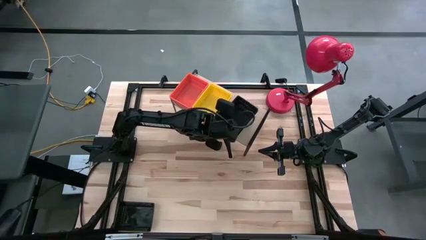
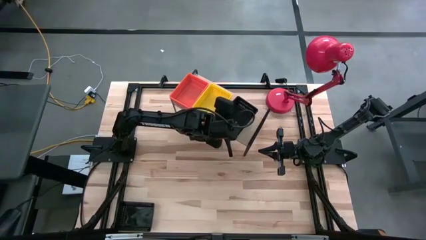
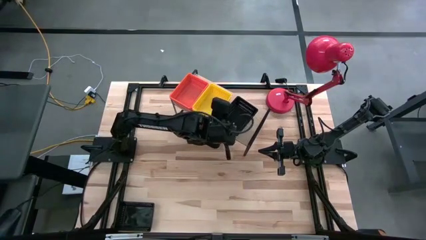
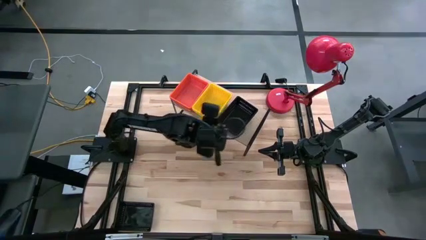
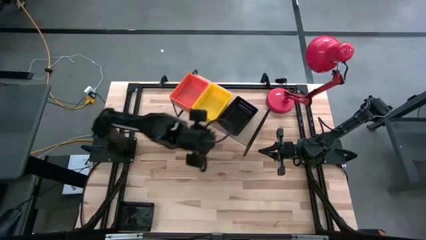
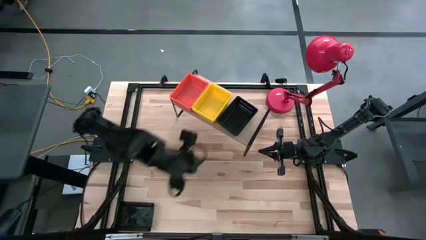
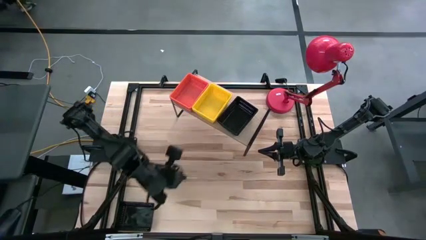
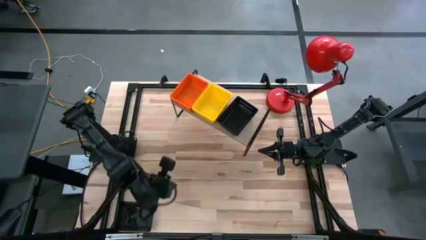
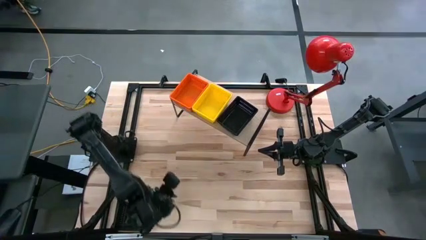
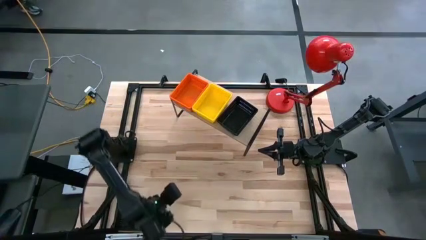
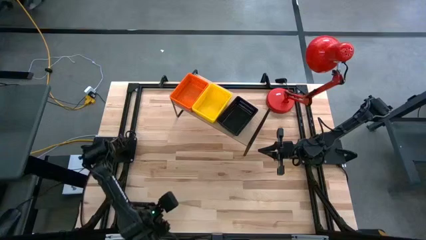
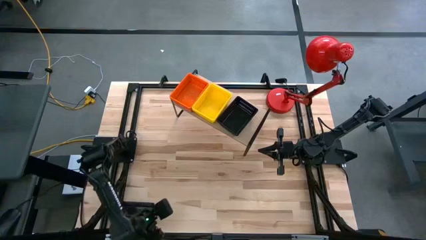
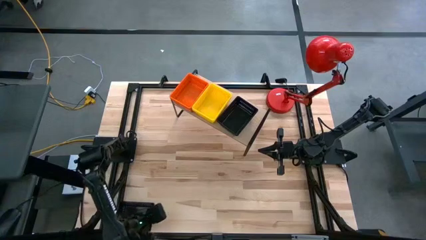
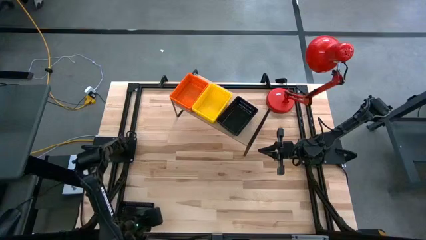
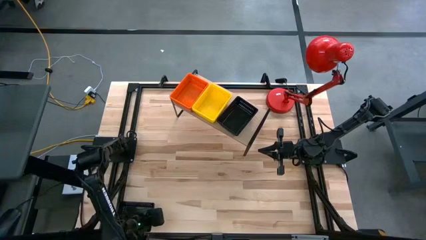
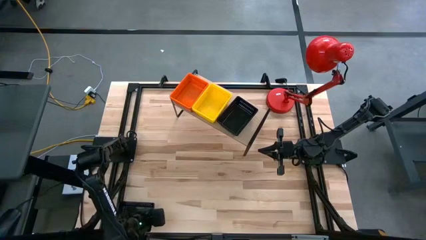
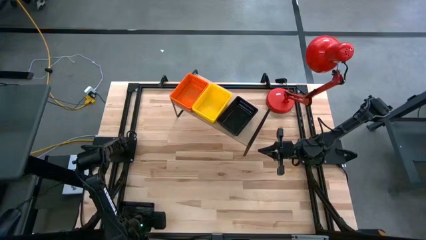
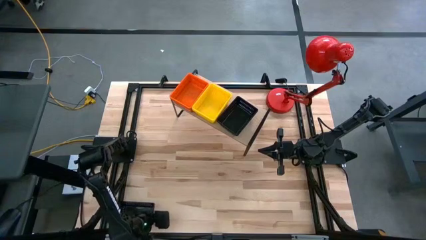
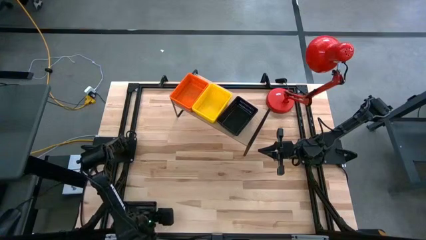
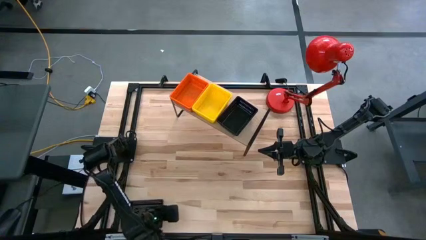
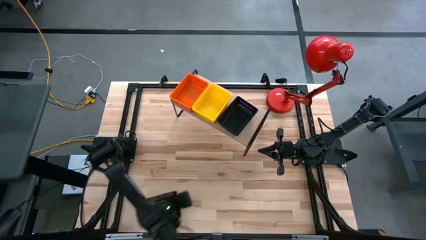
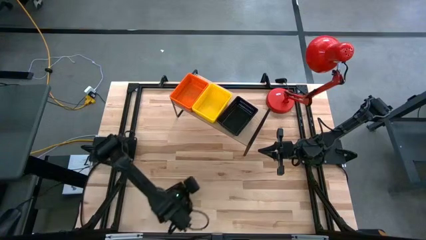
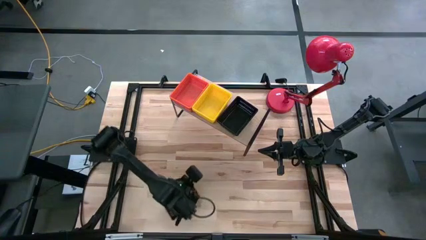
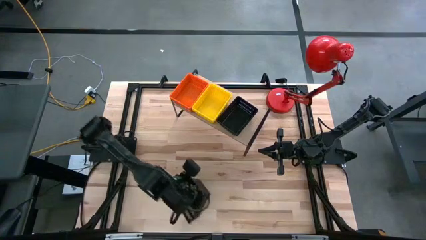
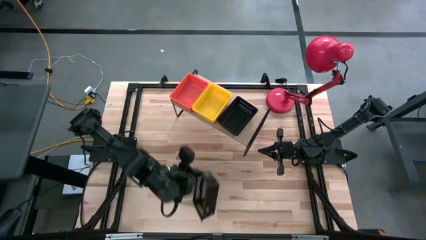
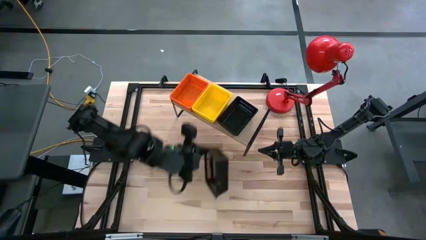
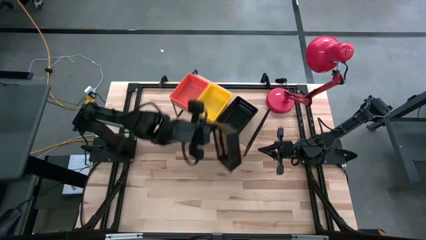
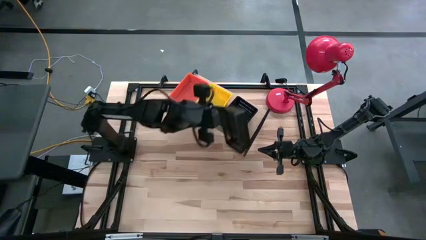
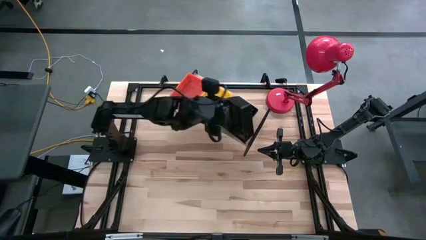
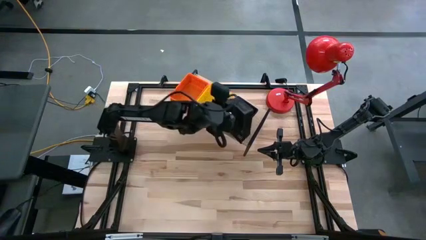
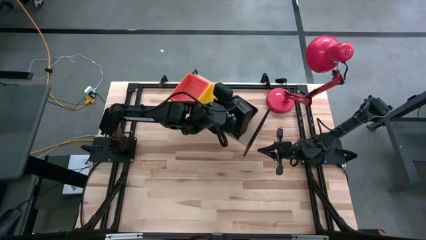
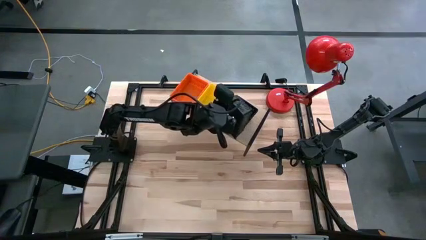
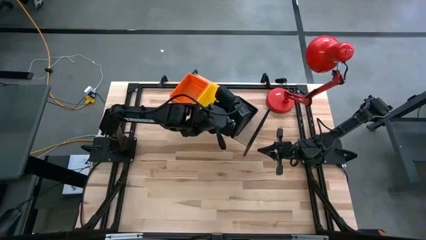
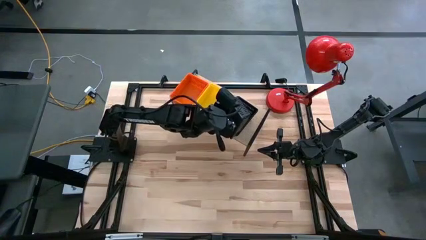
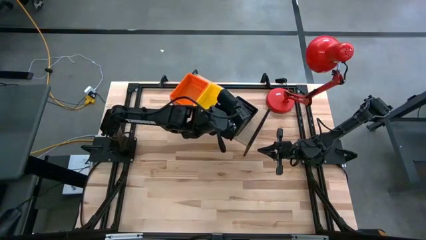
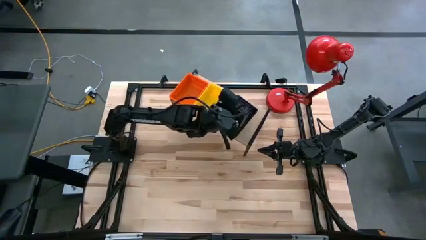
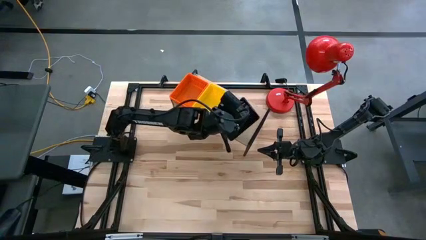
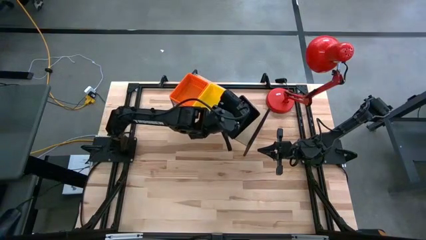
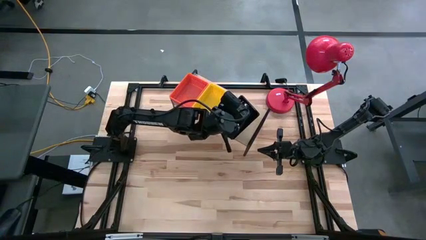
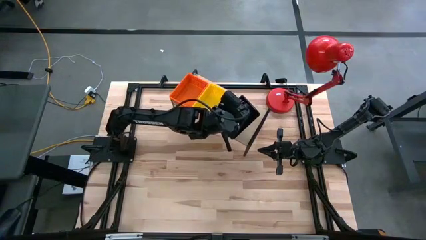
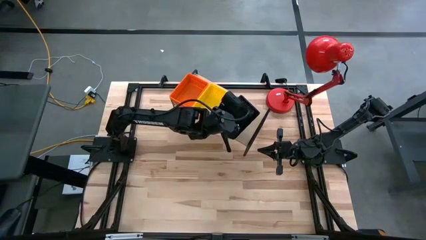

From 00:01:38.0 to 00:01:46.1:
Task: Stack baskets on shelf by color
Stack the black bin on top of the black bin on the shelf

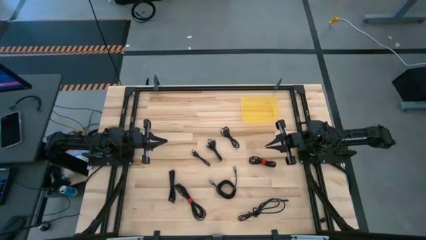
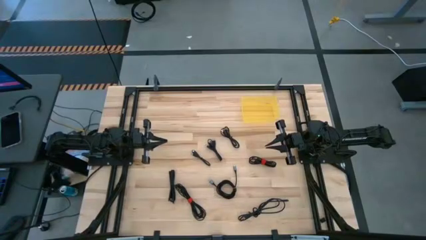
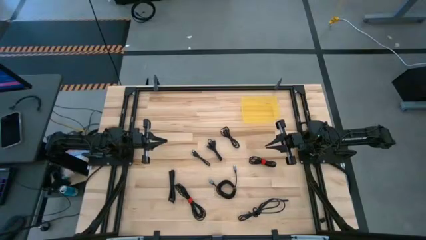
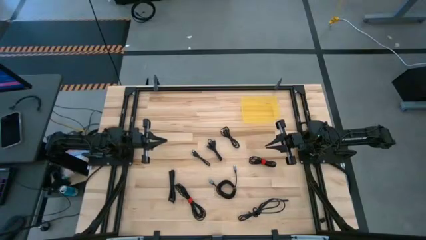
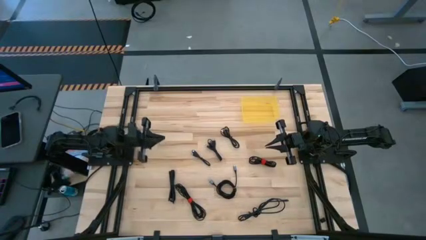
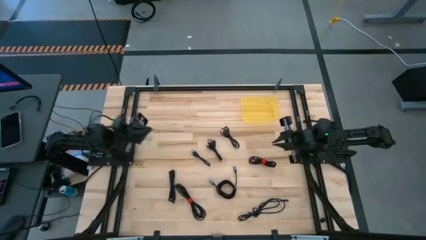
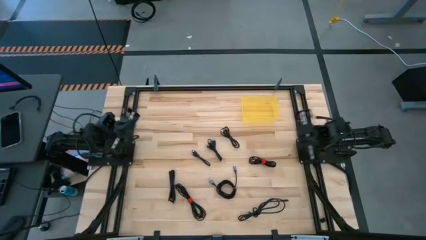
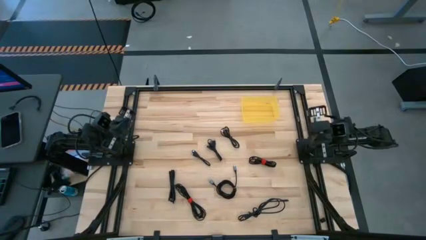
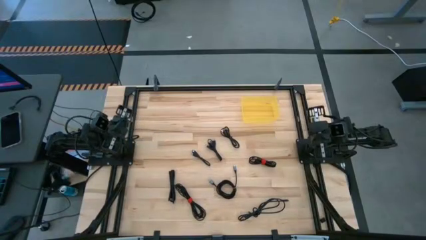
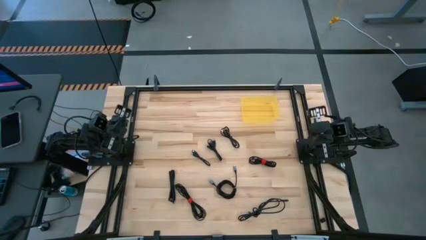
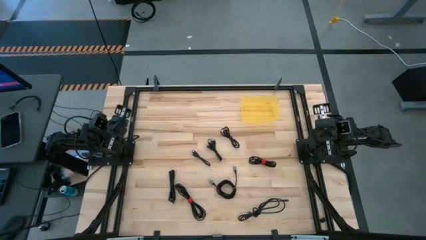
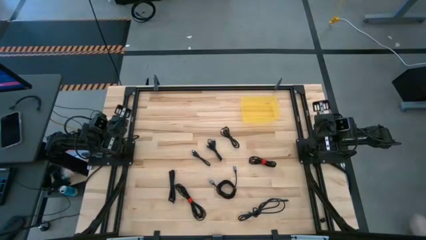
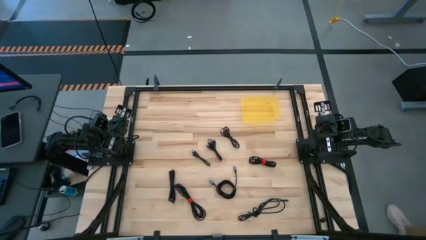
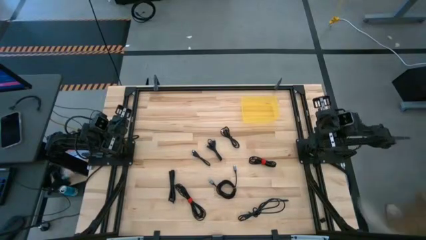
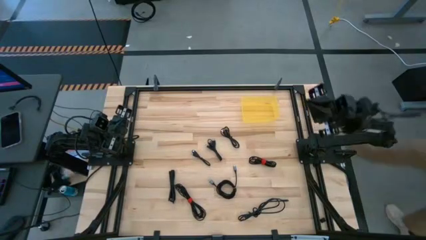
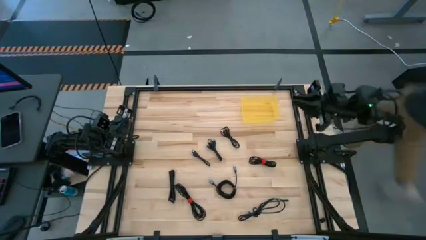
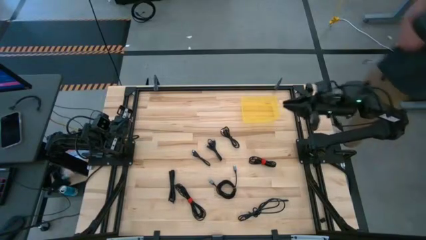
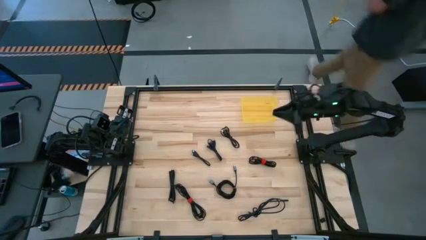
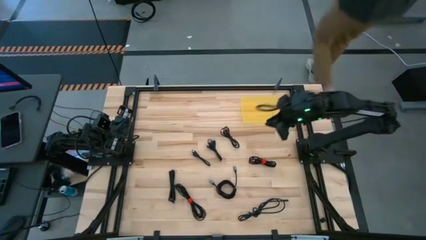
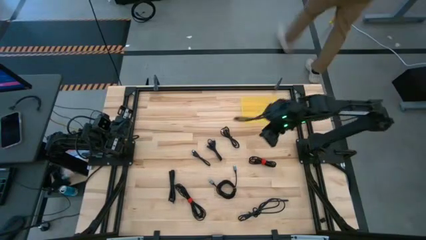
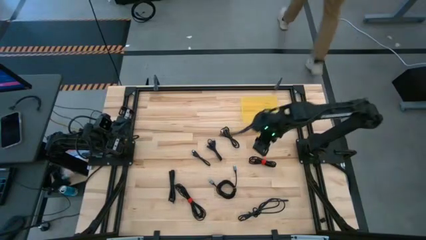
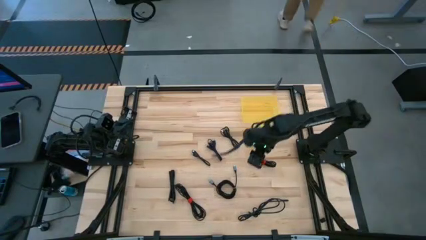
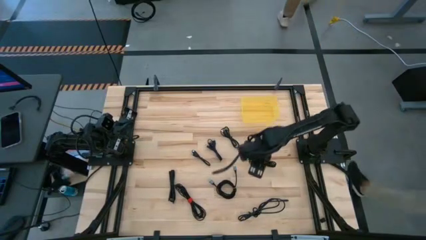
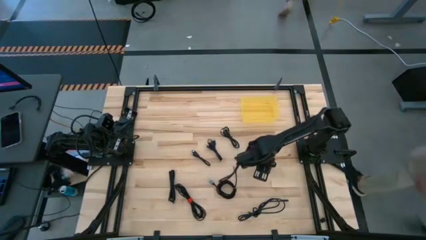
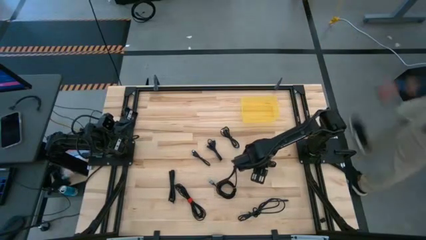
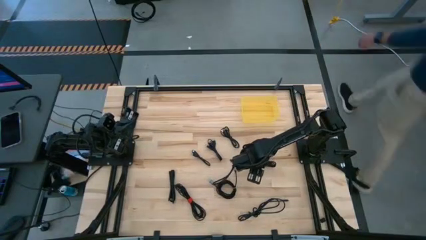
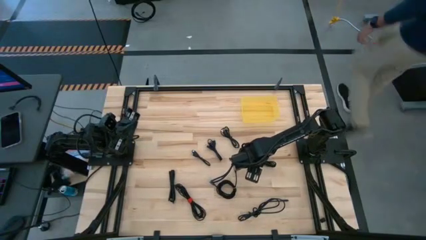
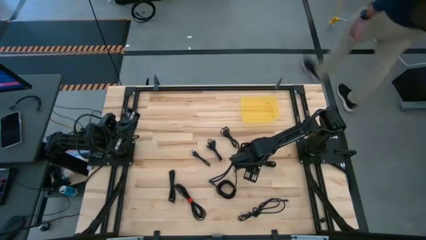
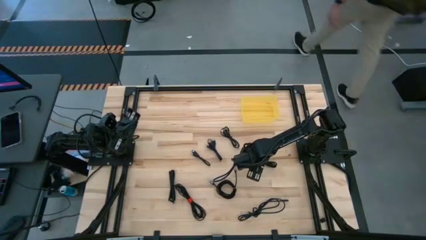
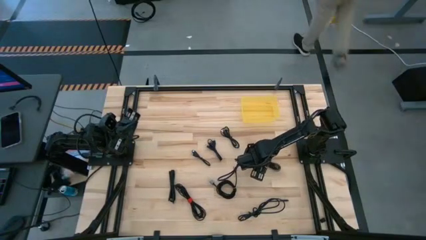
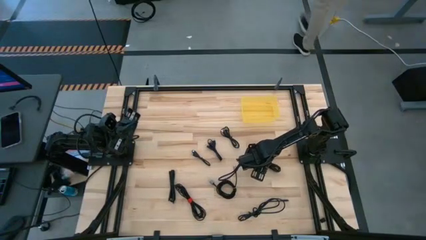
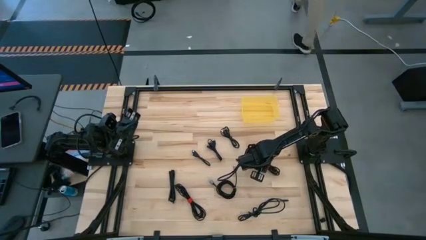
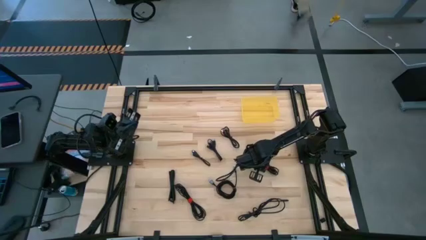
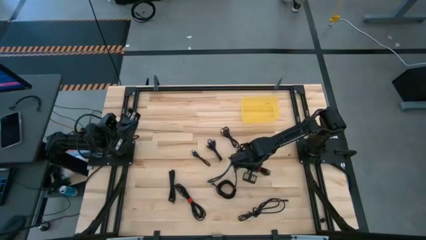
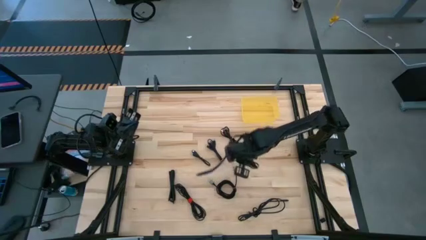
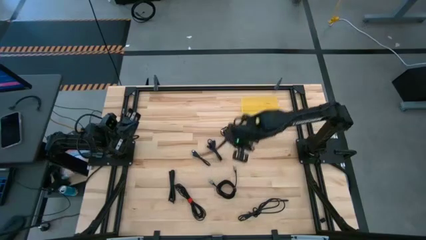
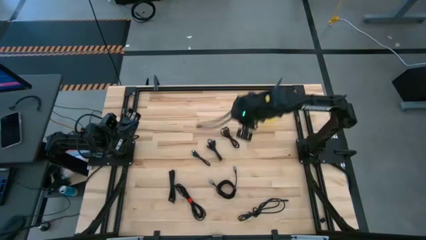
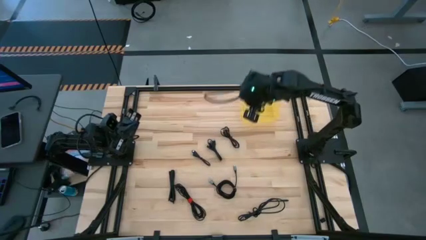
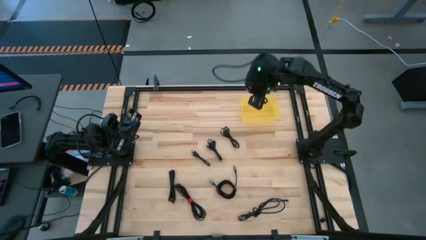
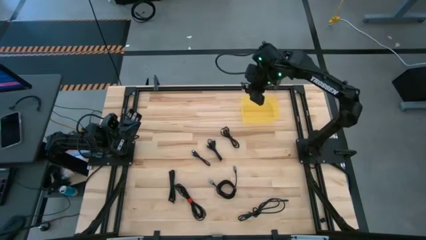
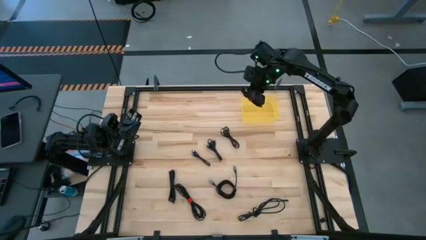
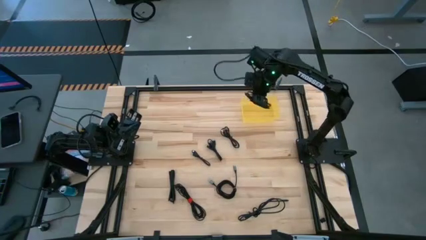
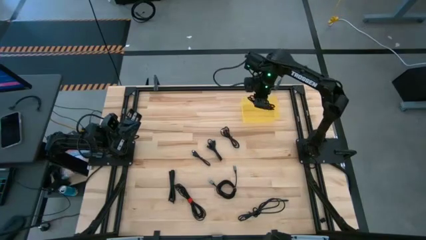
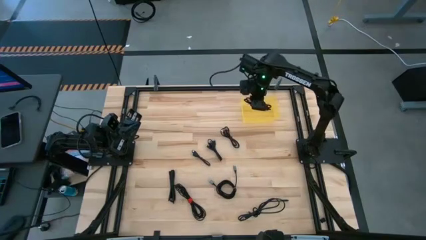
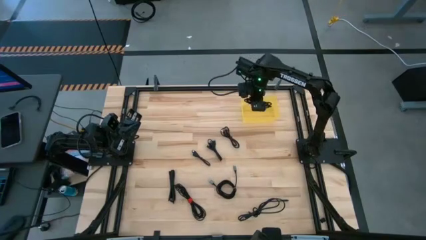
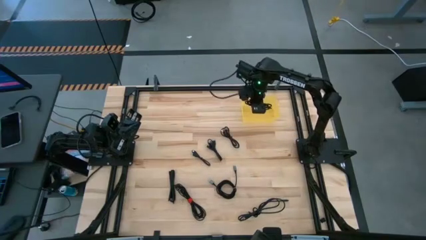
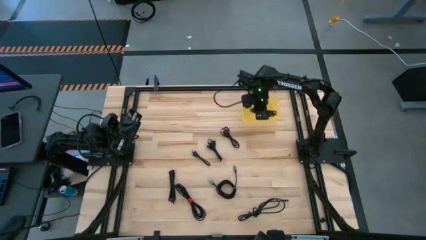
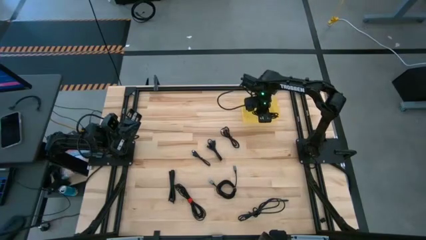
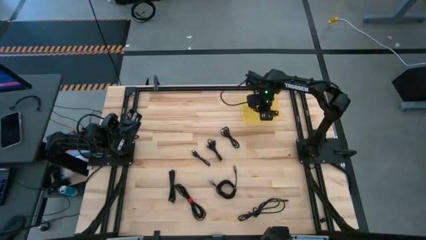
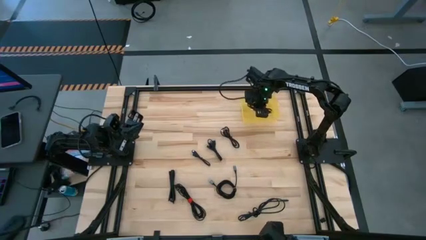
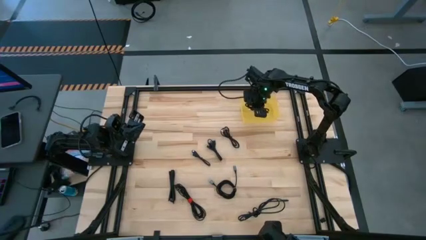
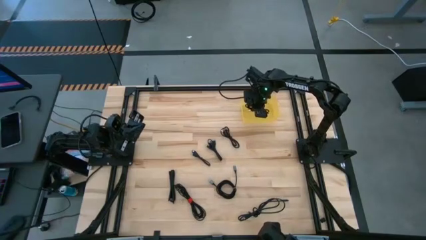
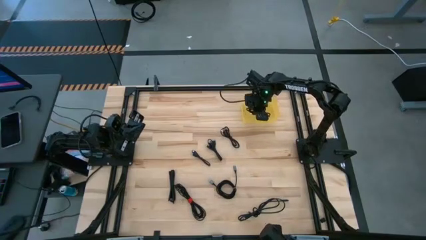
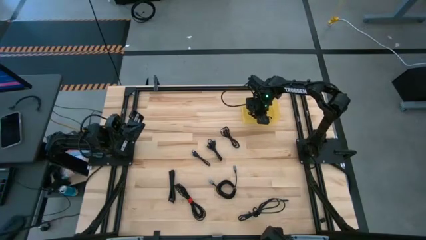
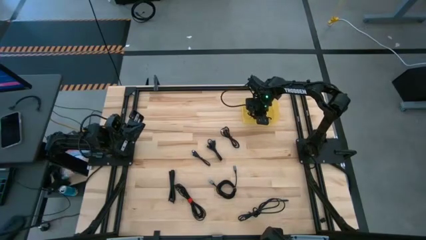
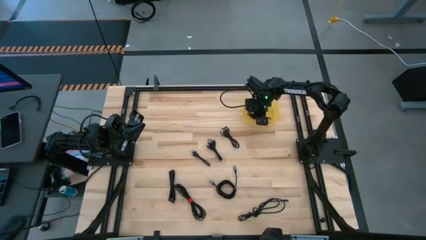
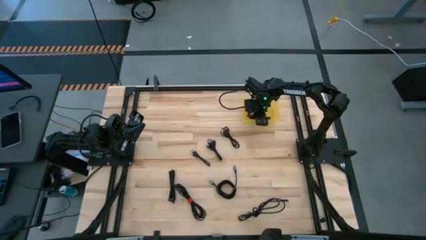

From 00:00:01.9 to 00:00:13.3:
Task: Pick and place USB-C Cables
Put the black charger cable into the yellow bin
